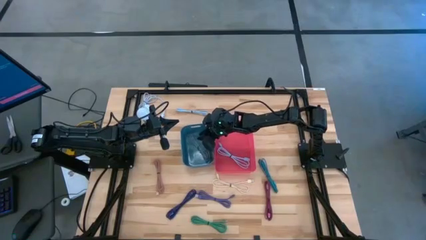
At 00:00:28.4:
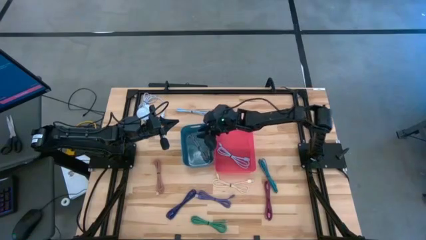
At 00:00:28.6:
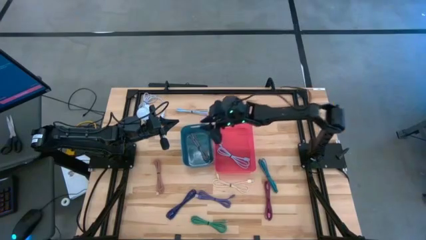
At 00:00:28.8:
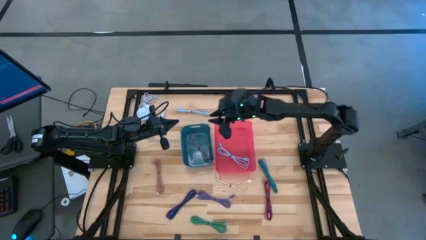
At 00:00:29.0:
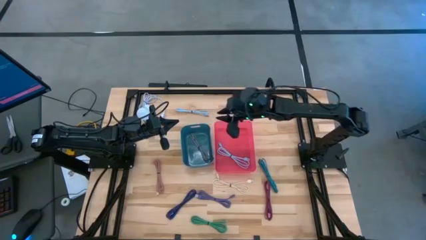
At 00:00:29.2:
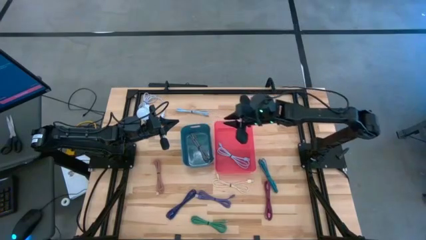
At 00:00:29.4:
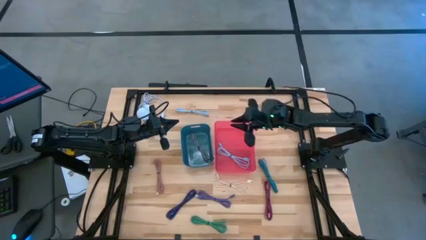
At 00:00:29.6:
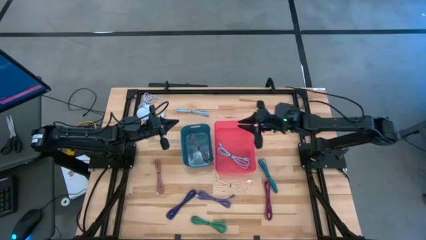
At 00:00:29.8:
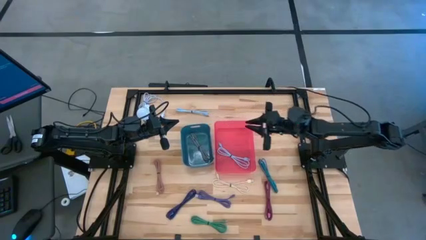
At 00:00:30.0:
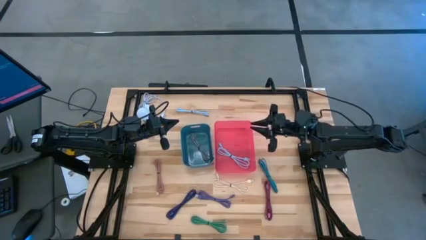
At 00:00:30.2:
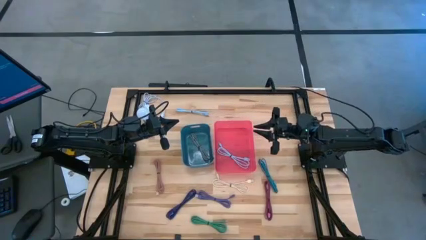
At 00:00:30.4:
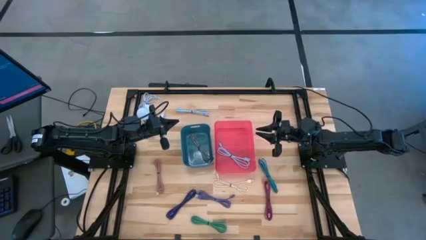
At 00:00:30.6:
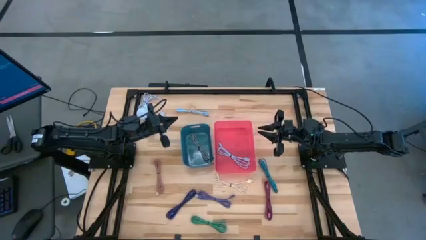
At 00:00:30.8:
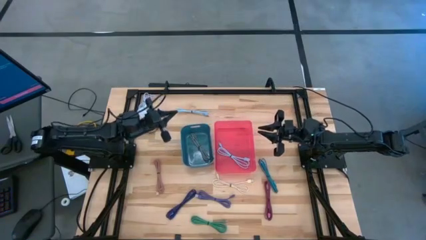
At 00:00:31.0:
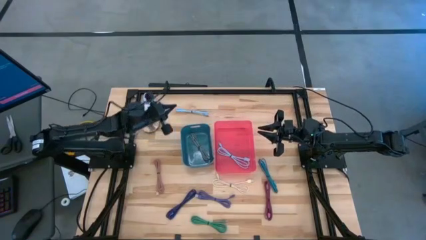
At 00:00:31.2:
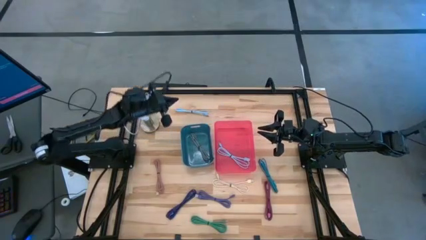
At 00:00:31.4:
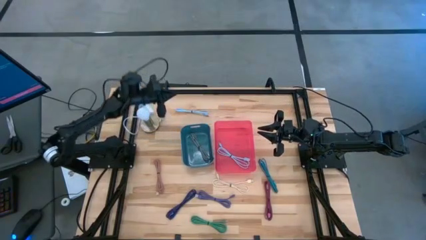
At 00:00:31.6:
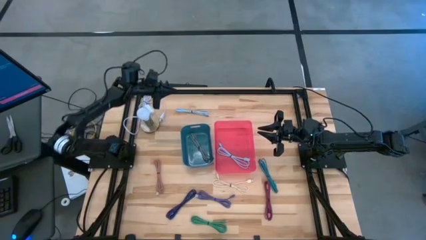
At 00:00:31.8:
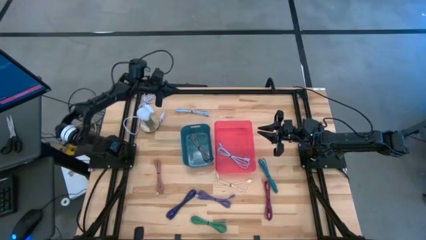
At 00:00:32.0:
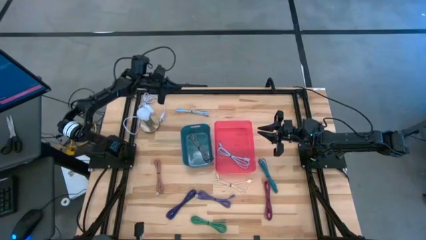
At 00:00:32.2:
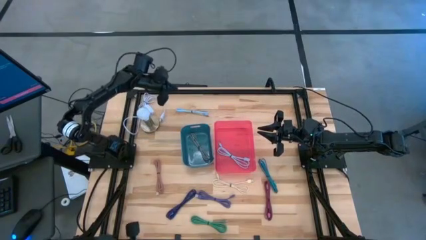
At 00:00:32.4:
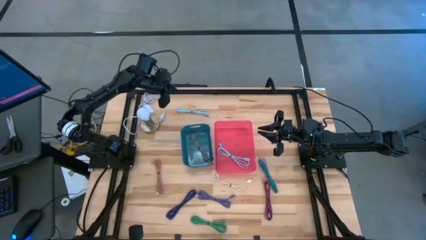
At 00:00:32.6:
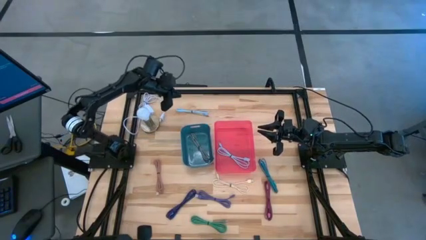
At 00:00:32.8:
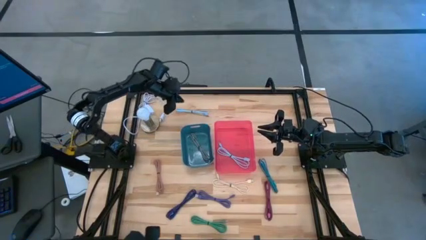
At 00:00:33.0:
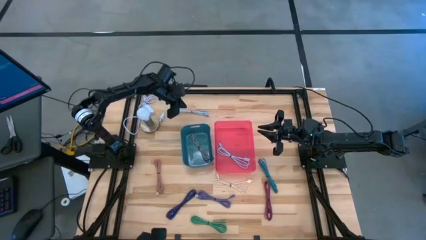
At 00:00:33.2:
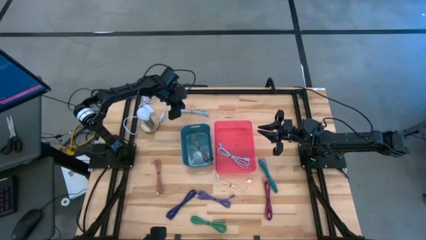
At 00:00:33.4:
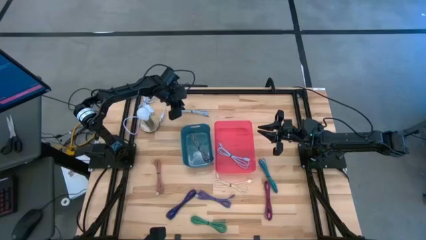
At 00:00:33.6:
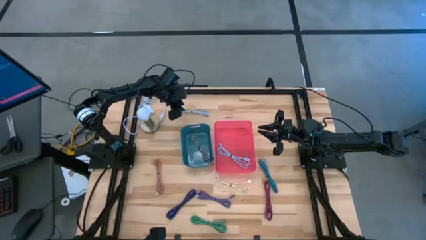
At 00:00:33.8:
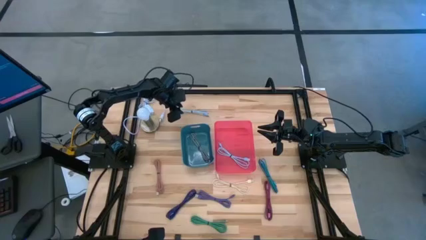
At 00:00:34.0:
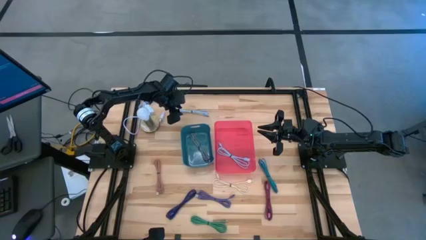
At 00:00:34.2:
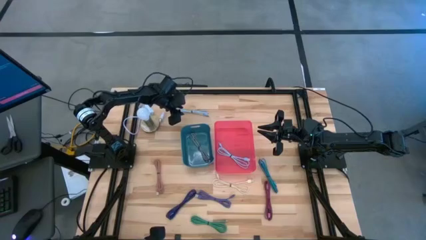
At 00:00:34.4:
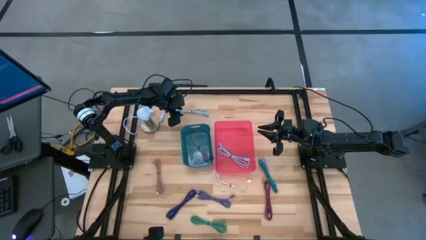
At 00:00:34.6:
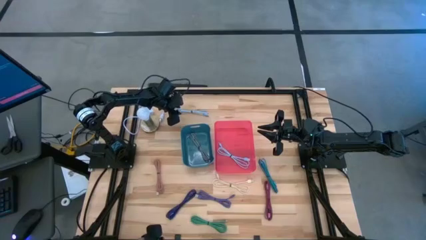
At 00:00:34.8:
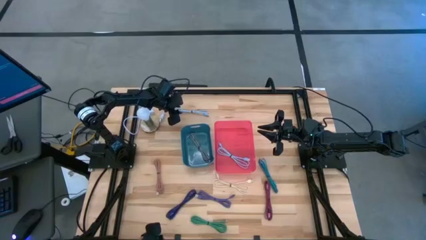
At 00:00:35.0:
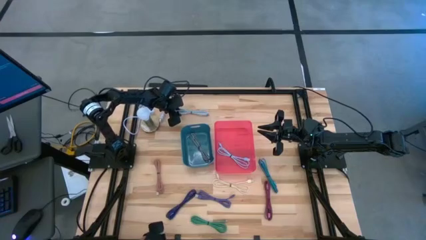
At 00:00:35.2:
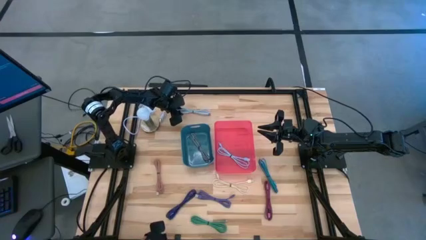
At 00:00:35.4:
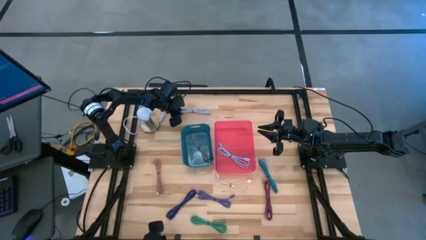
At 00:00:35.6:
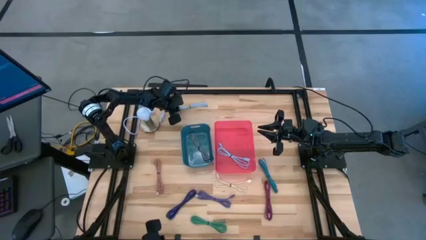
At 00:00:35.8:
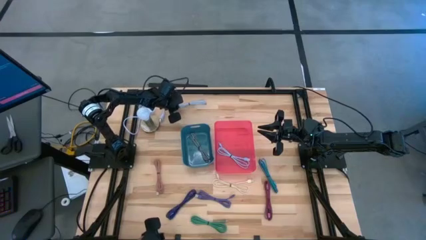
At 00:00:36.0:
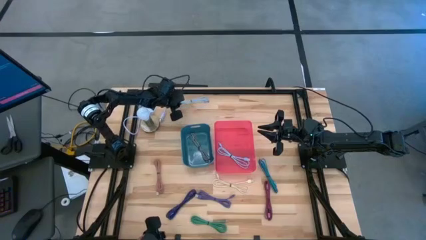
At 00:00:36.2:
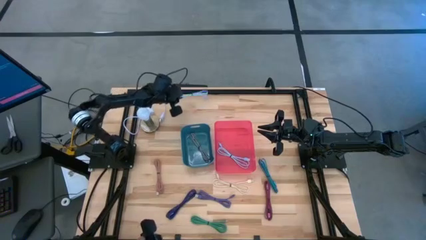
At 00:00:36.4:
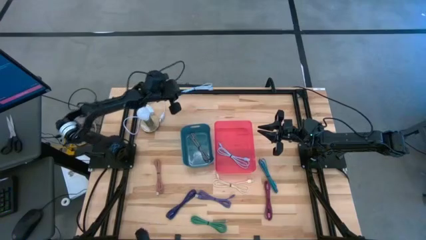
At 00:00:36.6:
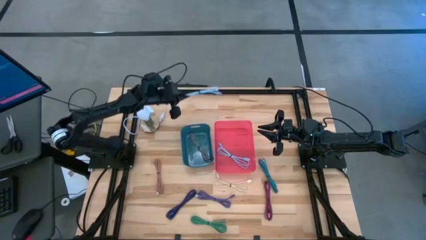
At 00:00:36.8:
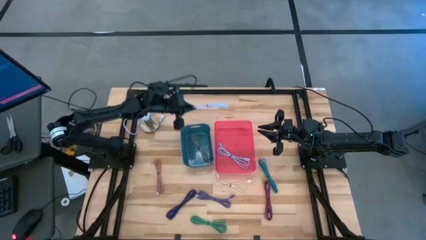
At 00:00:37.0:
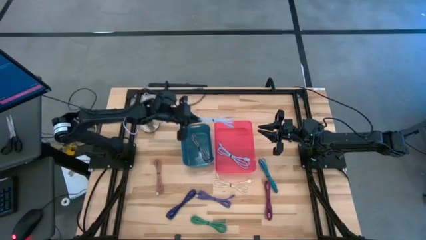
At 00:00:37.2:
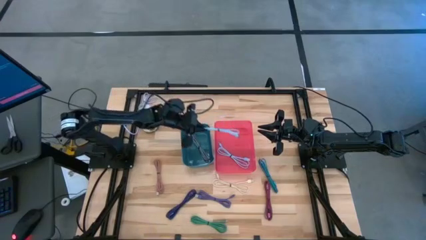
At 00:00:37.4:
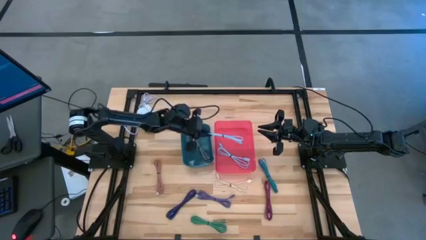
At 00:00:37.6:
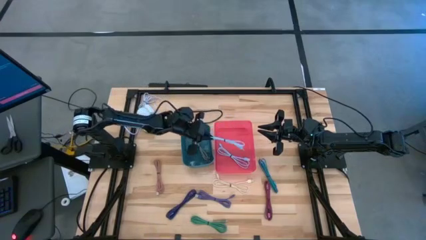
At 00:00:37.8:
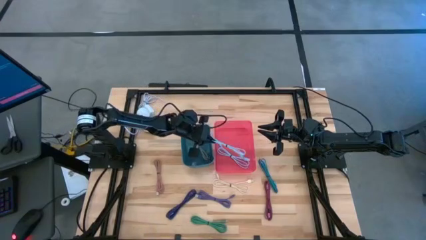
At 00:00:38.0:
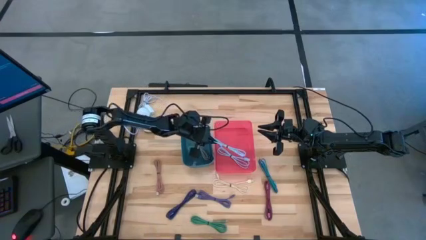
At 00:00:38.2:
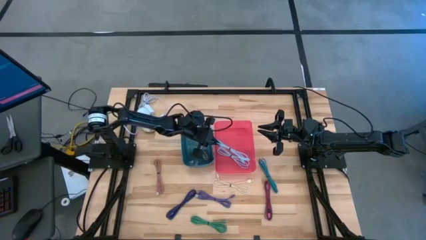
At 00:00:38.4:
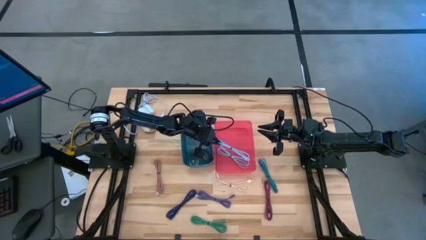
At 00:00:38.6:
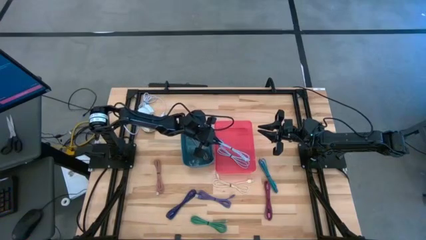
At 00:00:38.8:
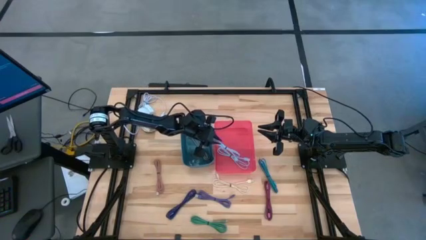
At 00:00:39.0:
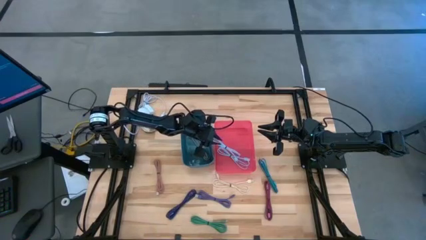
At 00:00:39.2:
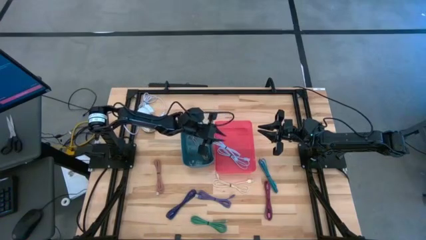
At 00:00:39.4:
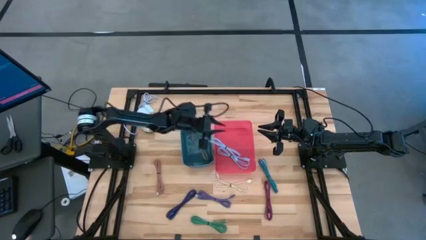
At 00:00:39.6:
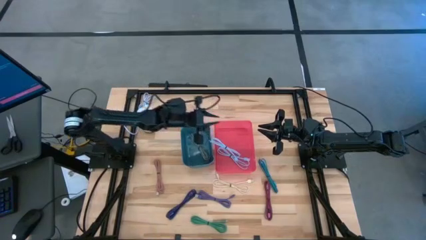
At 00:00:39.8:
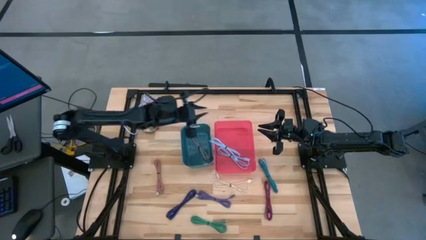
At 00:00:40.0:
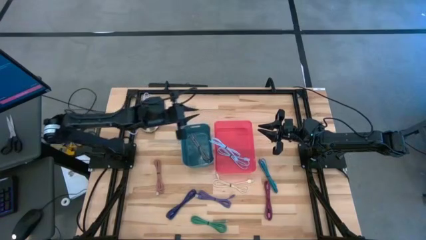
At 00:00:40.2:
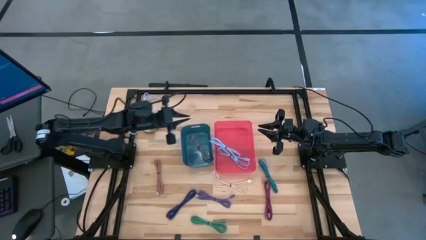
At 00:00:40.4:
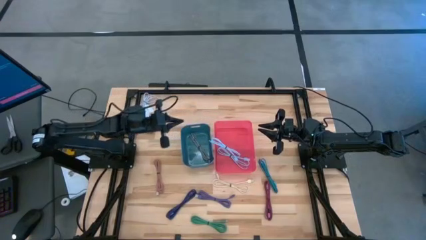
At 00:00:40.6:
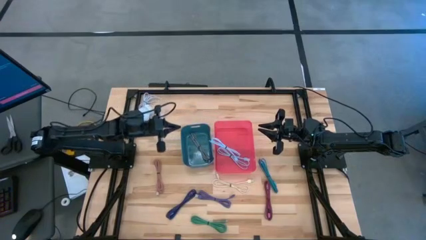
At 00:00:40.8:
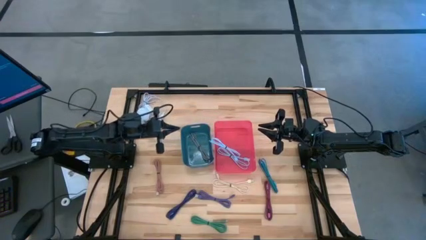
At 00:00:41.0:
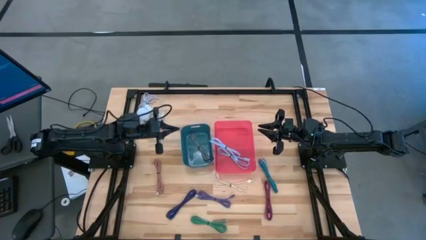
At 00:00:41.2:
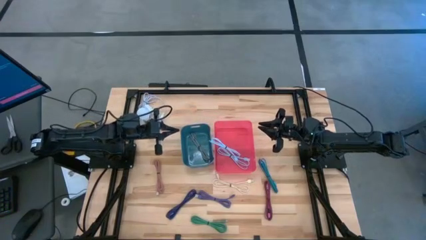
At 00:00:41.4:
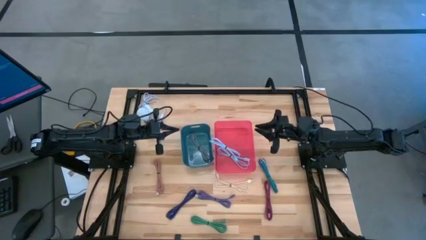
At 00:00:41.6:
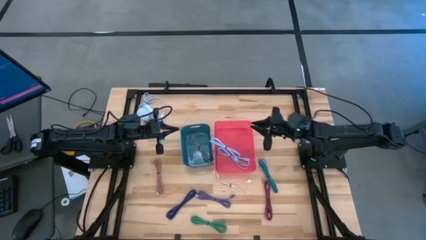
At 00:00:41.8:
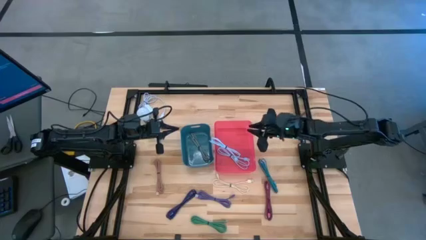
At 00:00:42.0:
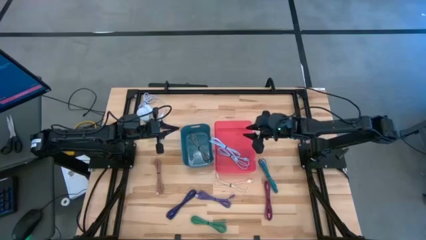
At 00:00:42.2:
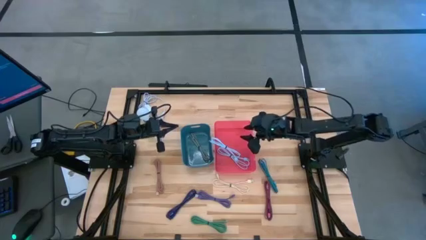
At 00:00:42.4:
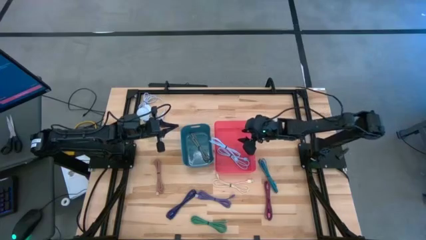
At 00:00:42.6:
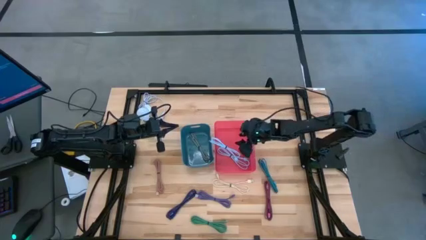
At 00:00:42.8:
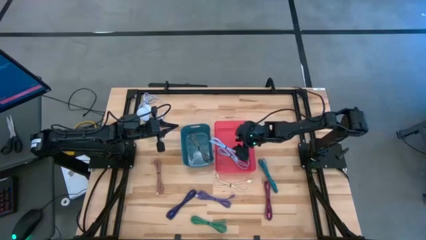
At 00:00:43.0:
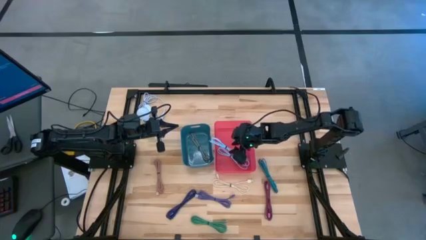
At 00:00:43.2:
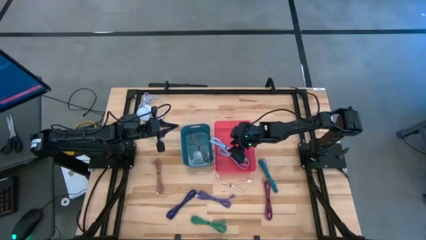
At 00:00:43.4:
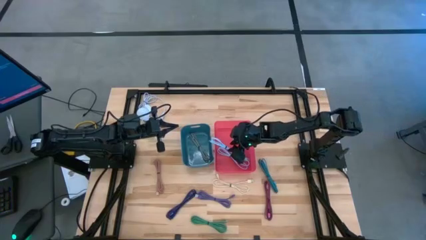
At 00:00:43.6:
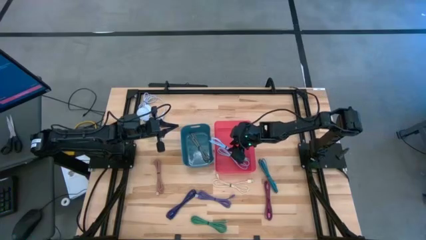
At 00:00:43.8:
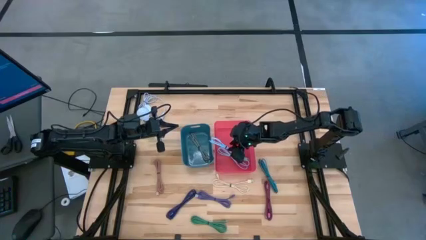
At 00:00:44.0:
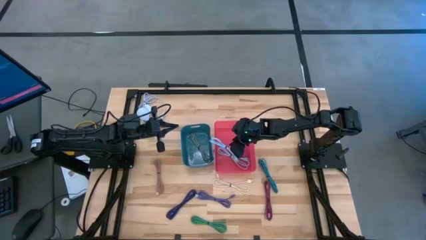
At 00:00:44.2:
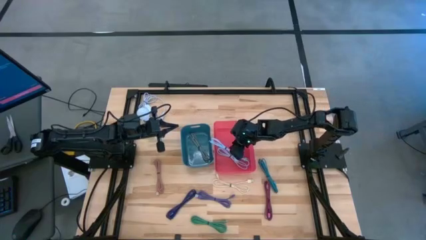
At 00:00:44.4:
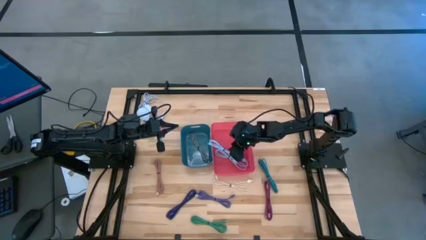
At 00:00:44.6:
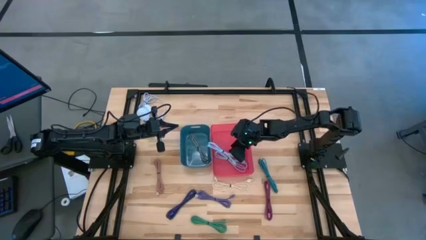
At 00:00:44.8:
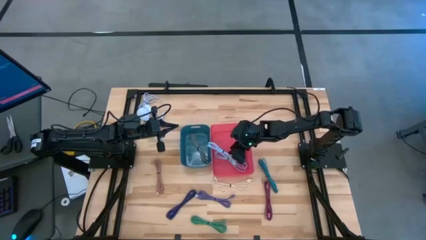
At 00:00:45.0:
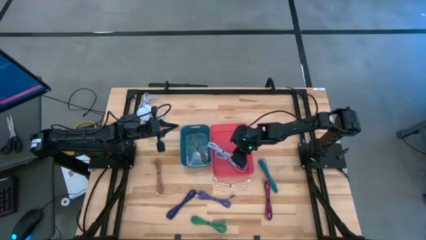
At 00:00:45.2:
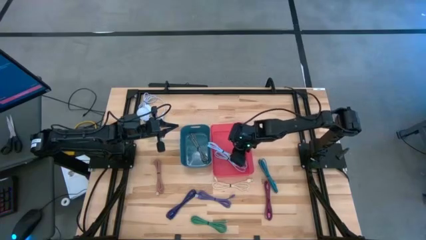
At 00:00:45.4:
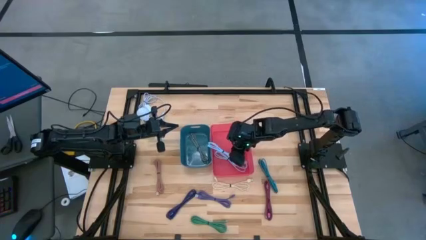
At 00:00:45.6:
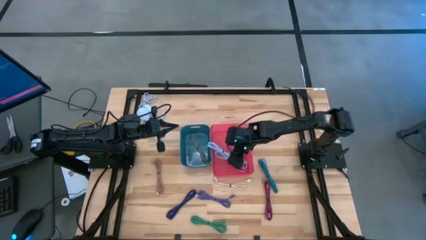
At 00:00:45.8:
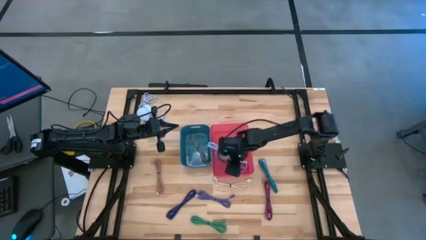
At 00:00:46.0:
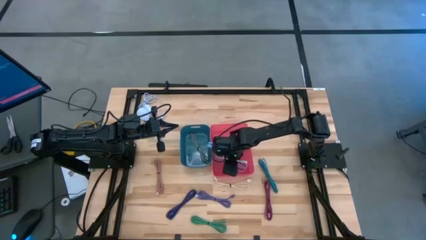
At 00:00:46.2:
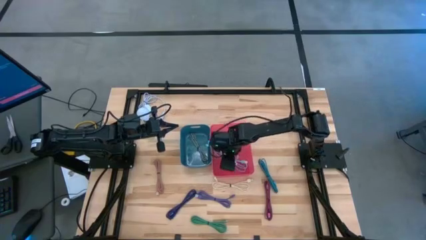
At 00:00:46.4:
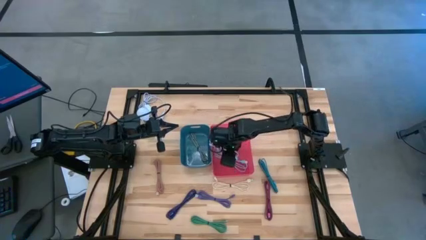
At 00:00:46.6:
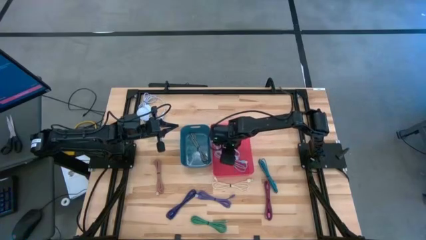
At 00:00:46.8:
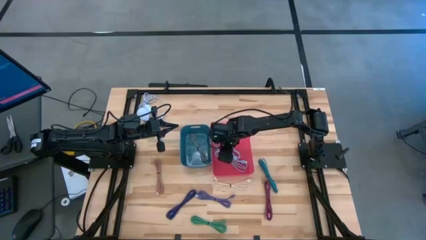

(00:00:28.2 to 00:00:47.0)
Task: Pick & Place USB Port
Put the white charger cable into the red bin
